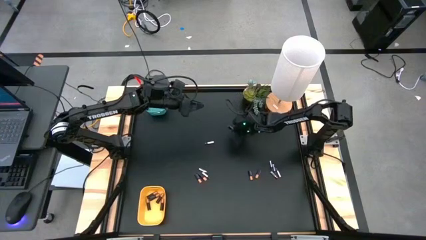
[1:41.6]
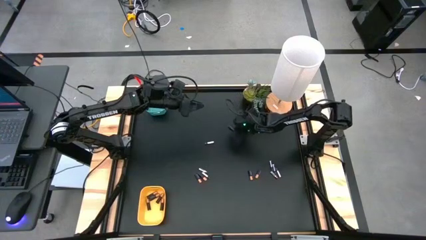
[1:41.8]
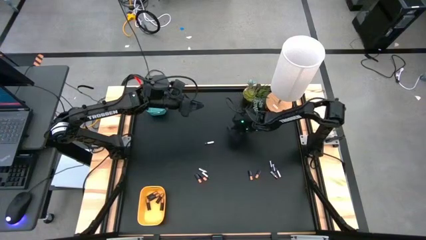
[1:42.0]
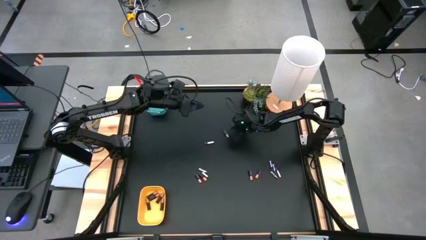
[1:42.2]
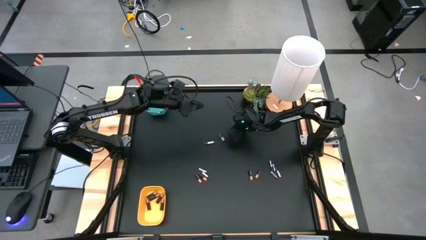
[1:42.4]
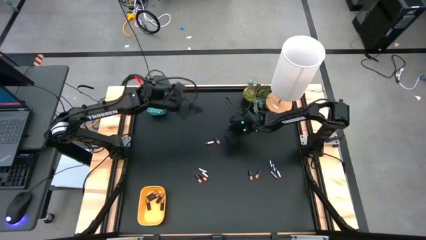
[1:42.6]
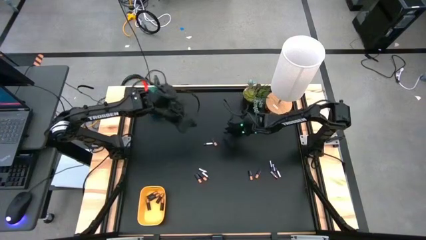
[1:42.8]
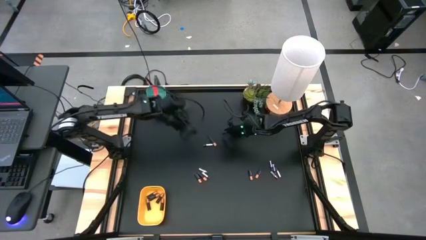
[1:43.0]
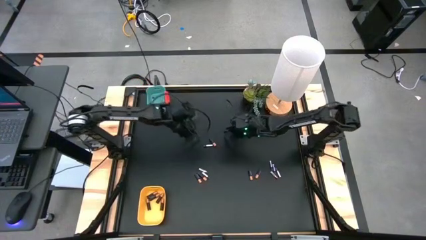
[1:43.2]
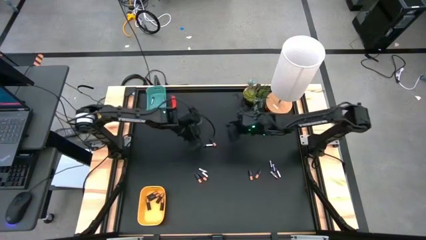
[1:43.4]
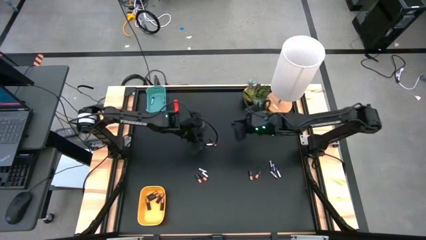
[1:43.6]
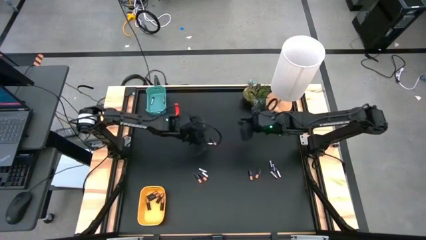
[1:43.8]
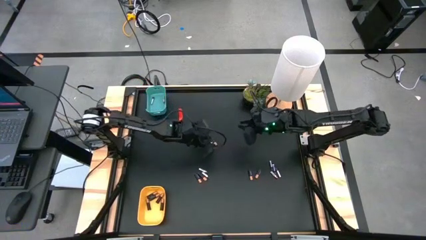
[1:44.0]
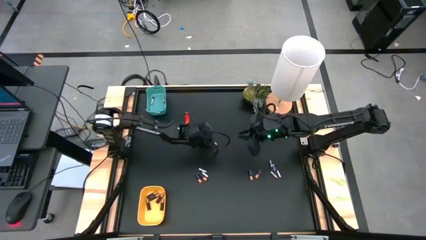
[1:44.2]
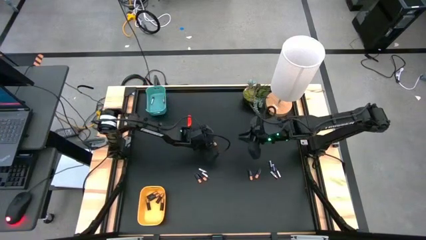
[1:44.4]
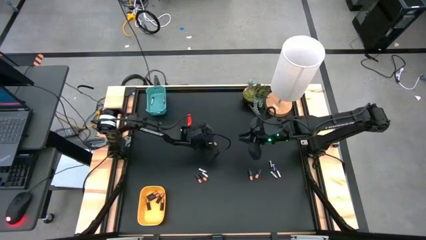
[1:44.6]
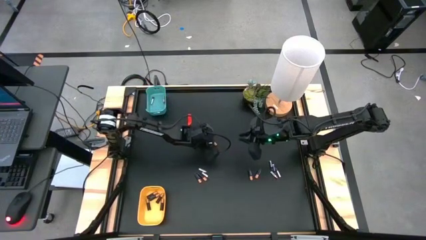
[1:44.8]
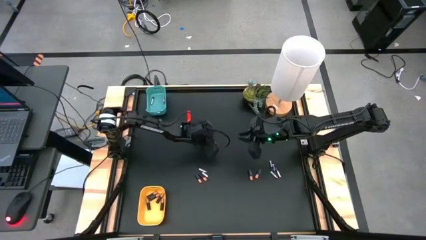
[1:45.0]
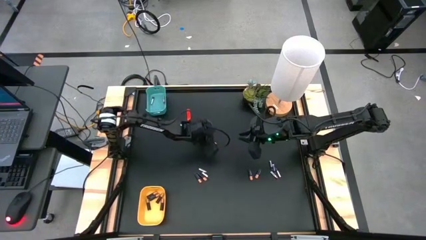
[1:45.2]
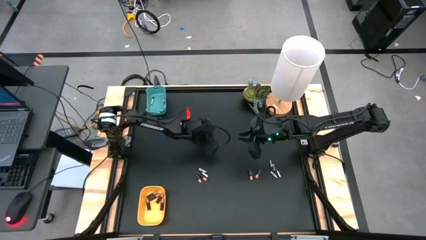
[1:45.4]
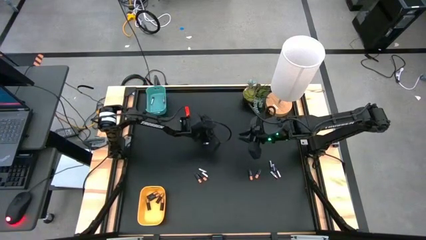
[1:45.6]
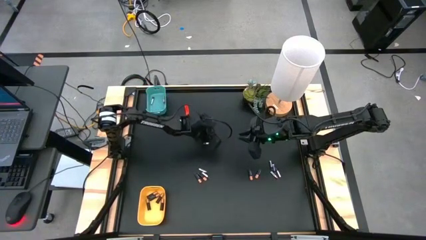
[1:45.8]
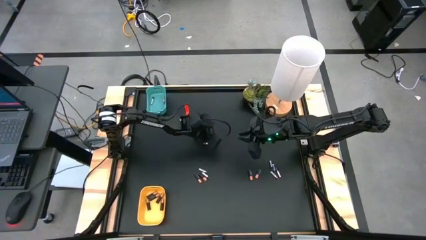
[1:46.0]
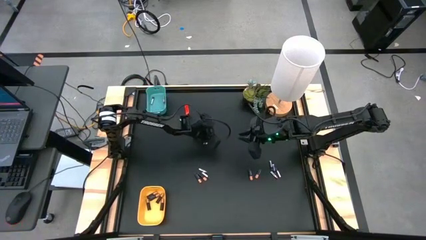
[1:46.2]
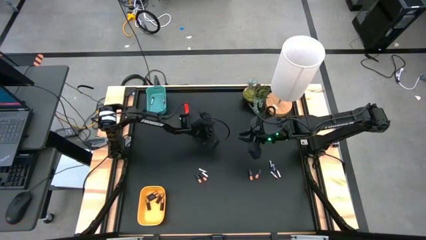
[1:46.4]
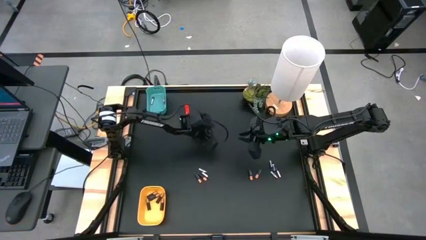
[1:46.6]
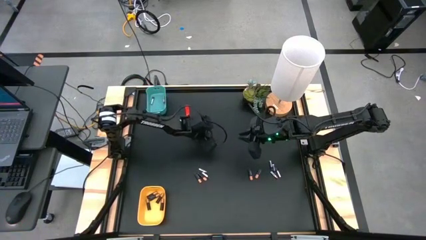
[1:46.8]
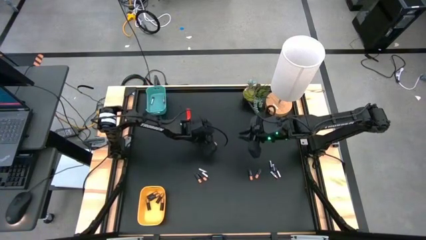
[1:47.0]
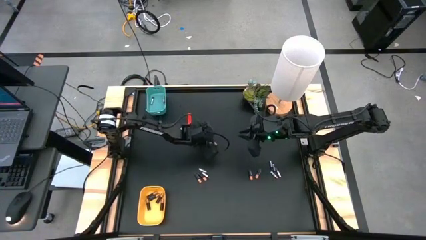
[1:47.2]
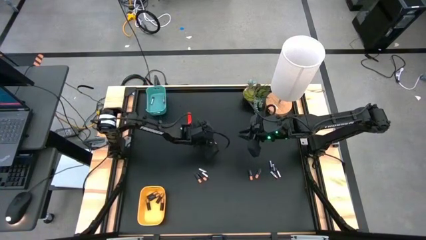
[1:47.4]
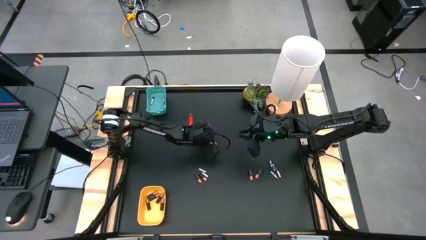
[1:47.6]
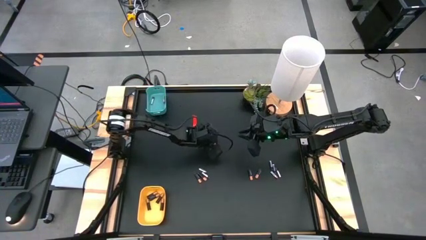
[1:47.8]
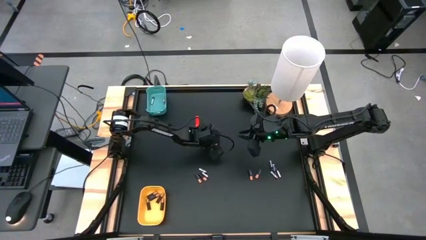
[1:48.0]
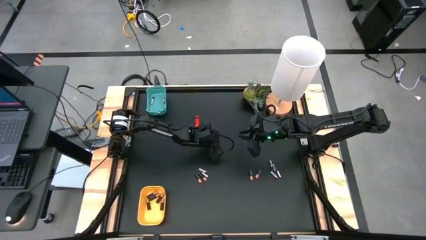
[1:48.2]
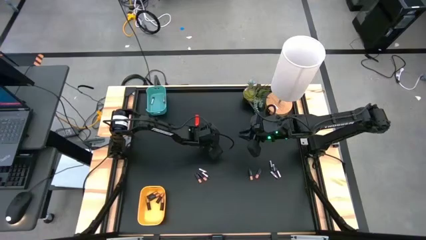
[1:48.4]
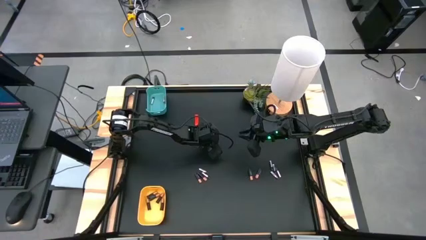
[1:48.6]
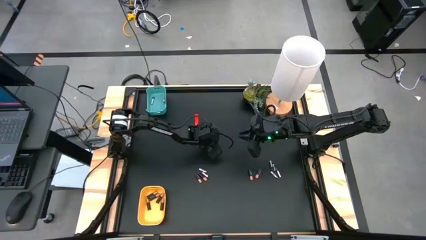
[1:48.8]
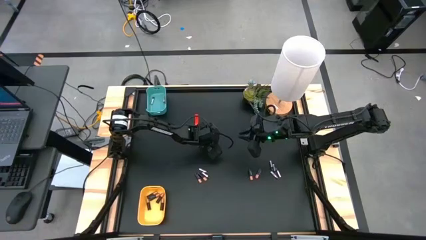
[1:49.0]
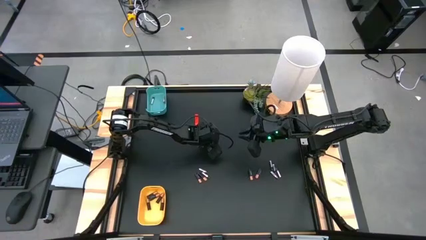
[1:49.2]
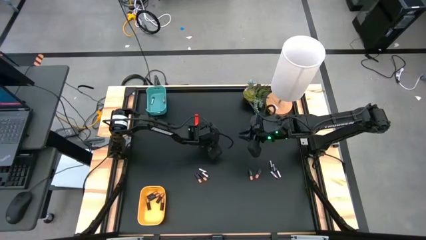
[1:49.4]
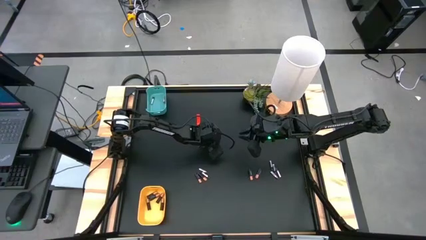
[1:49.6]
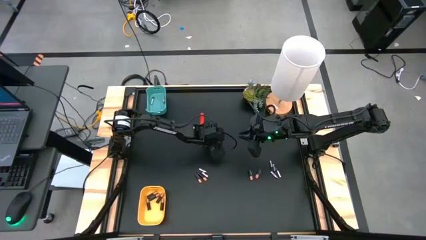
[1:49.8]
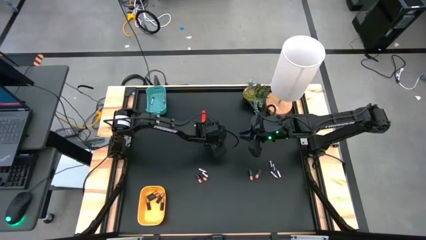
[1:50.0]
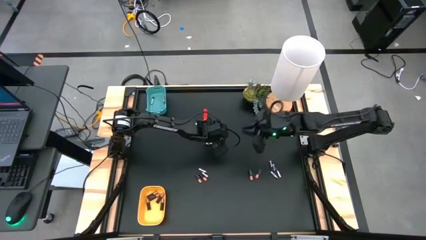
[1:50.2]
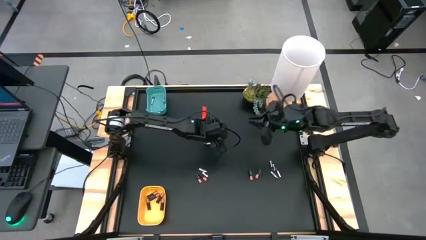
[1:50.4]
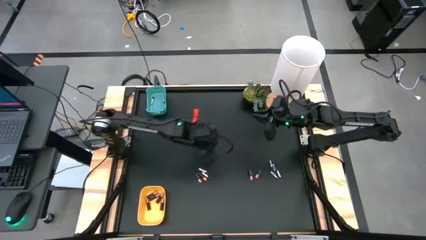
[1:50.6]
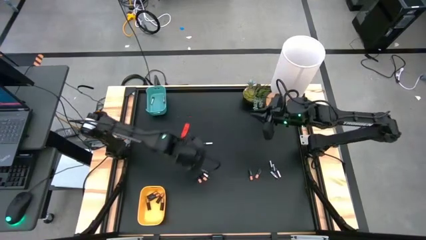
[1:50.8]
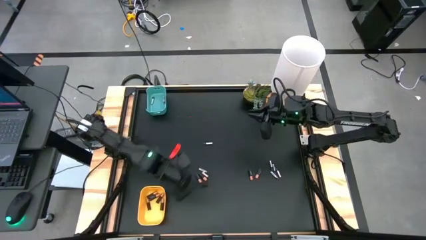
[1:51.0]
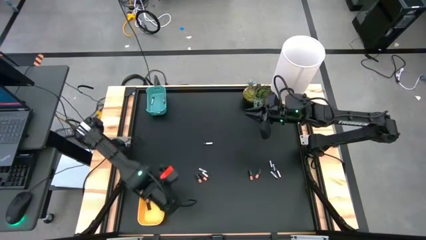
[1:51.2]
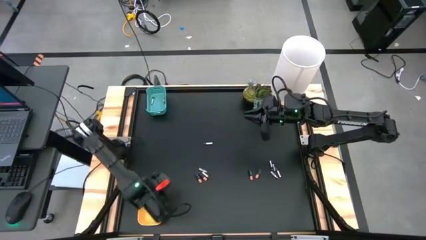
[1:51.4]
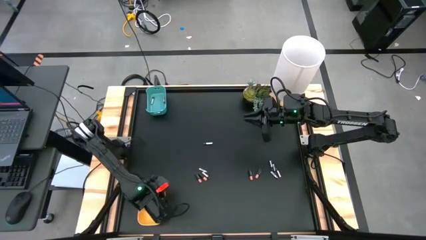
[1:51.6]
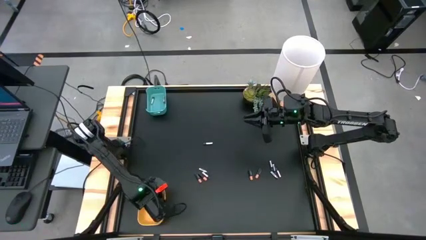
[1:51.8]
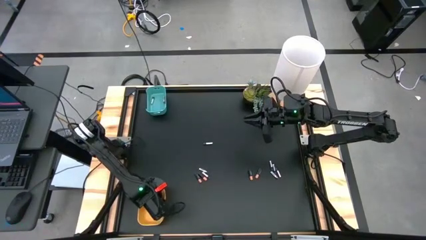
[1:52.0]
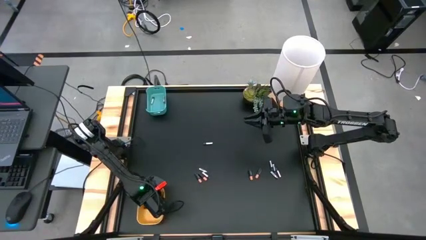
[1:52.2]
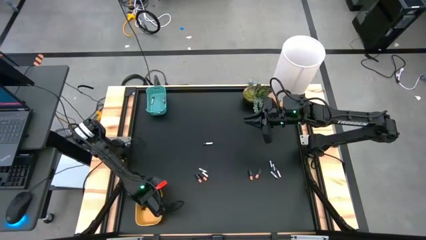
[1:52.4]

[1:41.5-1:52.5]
Task: Sort batteries
Put the black battery into the yellow bin

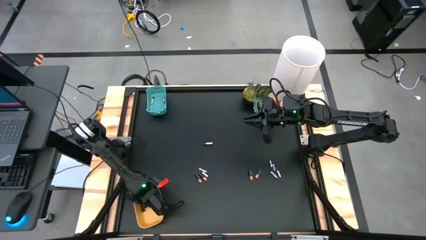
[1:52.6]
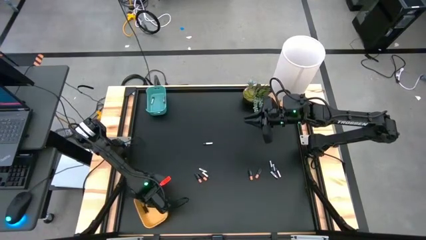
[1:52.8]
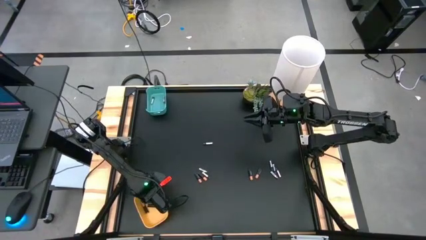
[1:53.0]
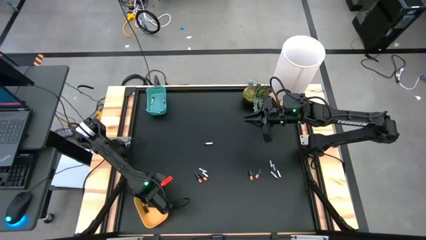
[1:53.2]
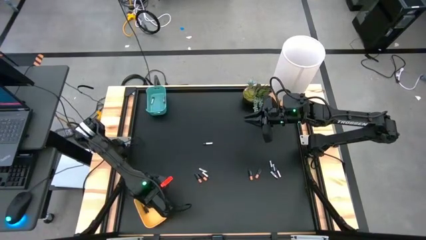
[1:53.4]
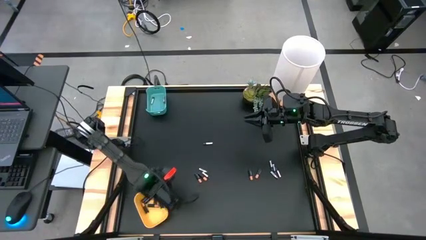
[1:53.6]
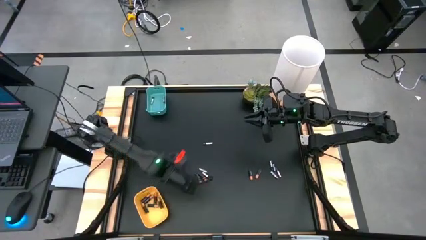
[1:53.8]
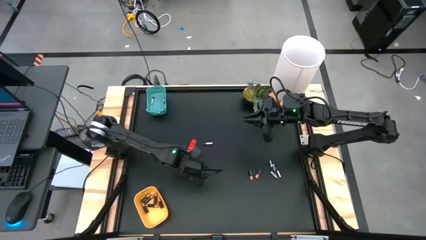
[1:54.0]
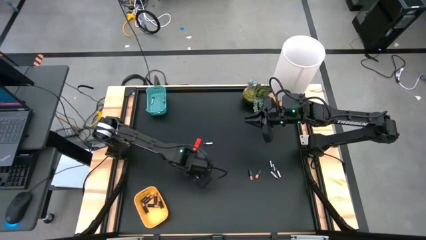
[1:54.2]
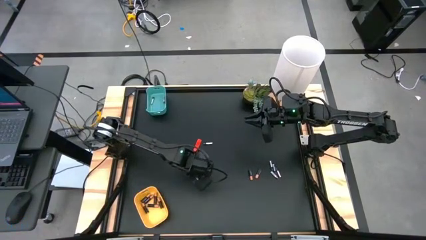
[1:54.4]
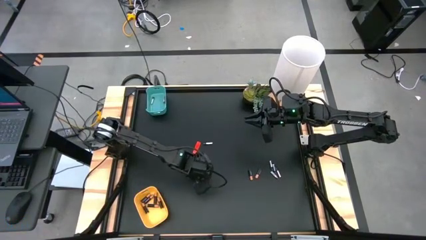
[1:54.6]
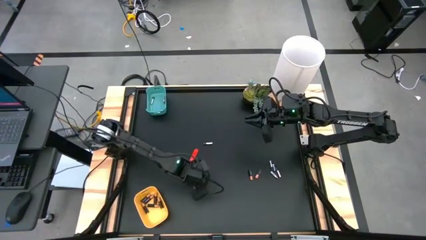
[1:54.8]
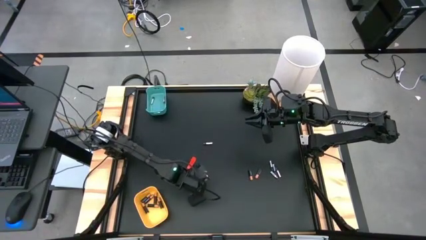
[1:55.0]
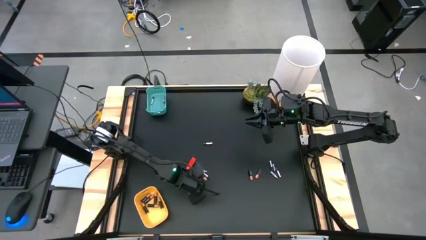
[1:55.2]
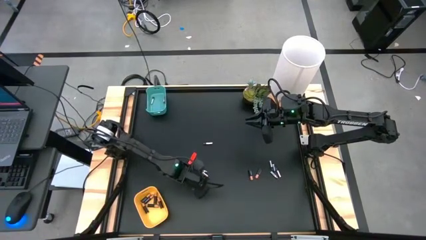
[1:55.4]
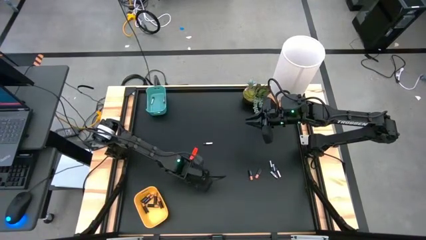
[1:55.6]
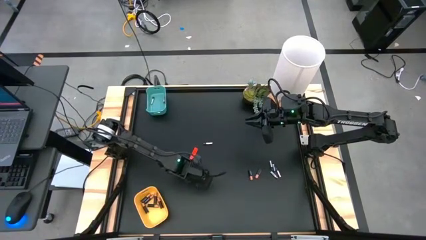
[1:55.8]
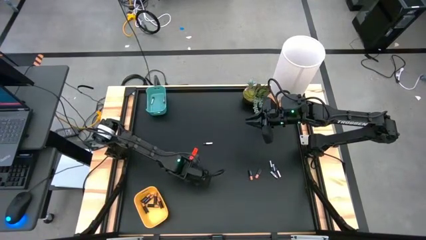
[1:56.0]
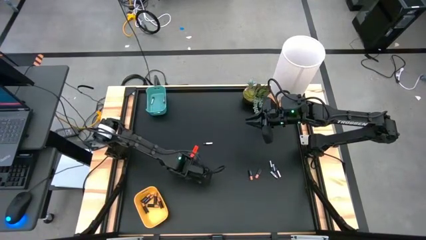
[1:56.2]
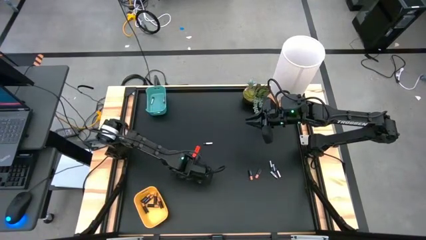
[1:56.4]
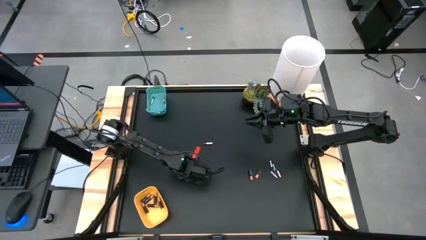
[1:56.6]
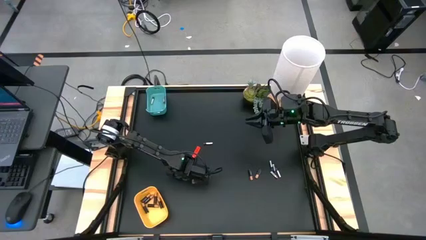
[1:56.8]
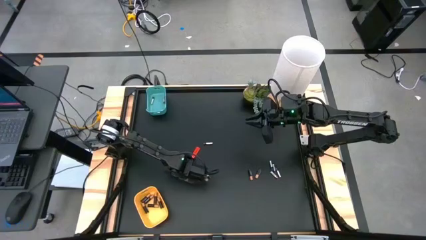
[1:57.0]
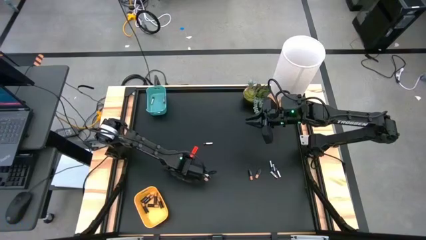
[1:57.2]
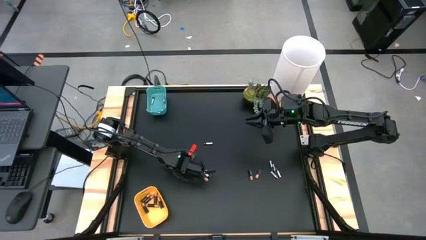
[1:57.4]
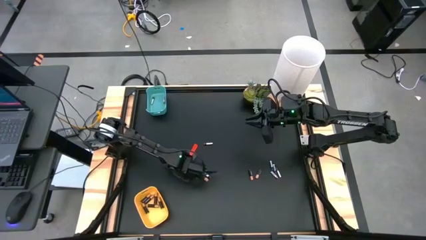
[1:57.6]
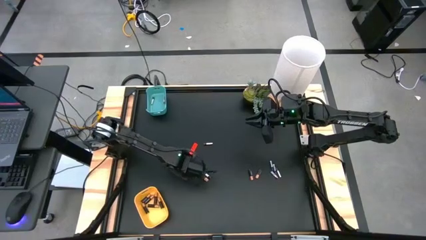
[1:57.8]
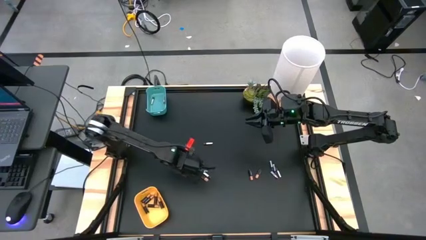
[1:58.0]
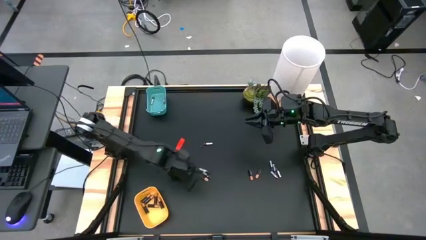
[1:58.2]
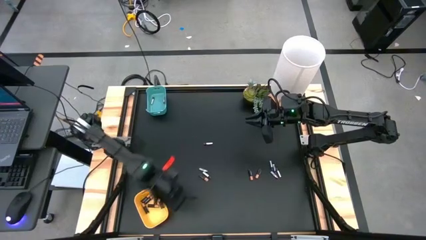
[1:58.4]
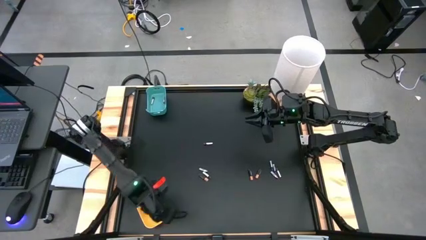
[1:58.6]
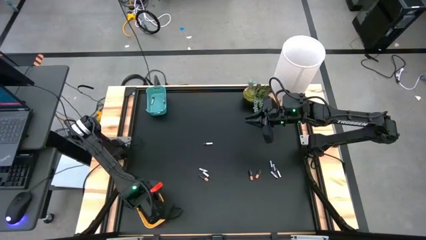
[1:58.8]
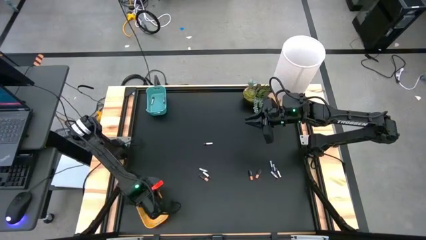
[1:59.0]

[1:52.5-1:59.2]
Put the black battery into the yellow bin
